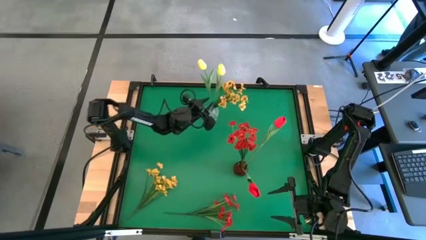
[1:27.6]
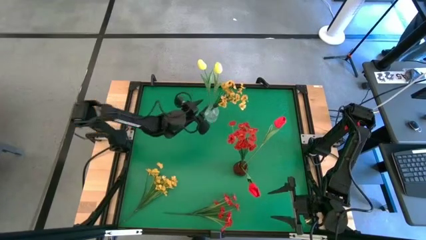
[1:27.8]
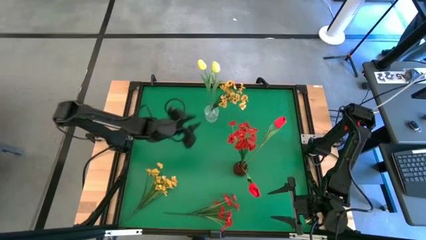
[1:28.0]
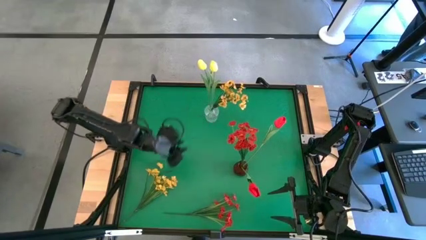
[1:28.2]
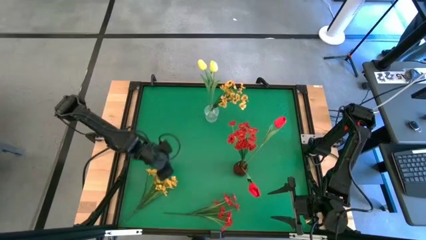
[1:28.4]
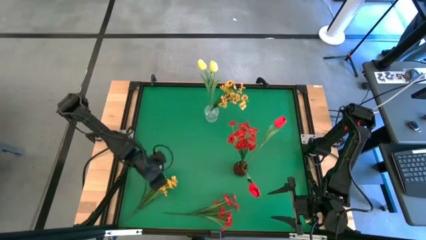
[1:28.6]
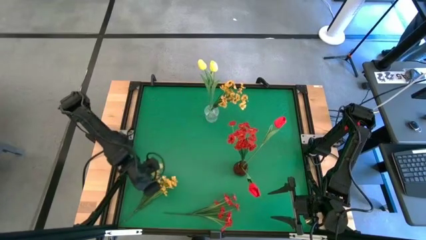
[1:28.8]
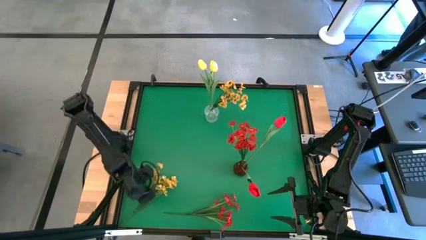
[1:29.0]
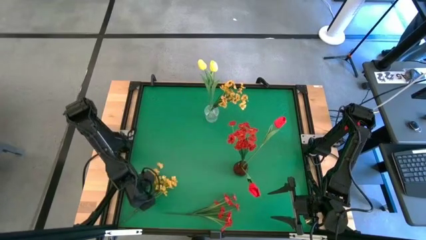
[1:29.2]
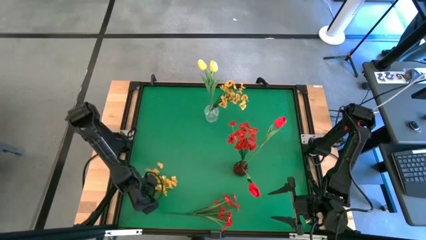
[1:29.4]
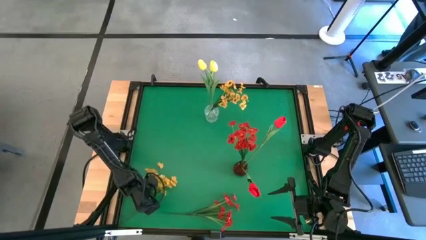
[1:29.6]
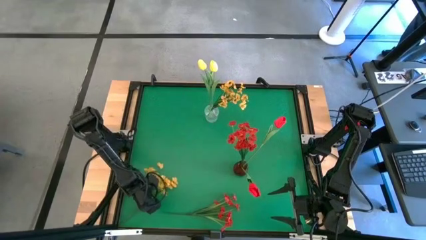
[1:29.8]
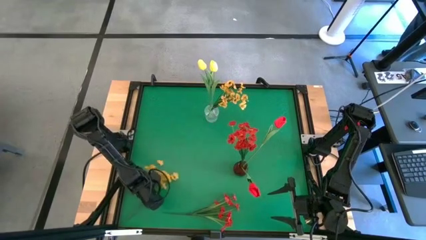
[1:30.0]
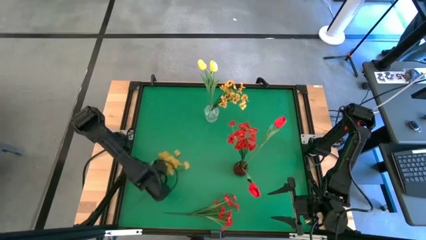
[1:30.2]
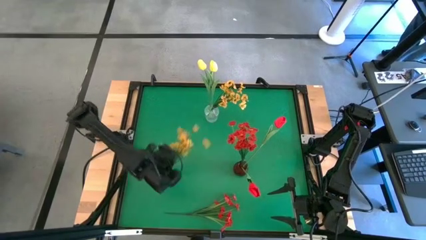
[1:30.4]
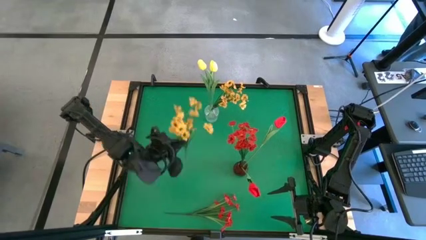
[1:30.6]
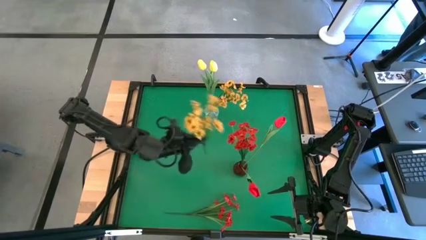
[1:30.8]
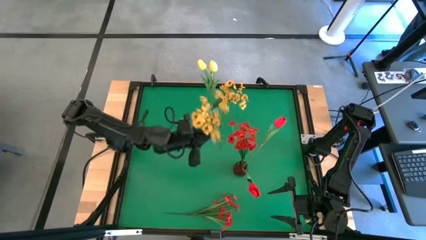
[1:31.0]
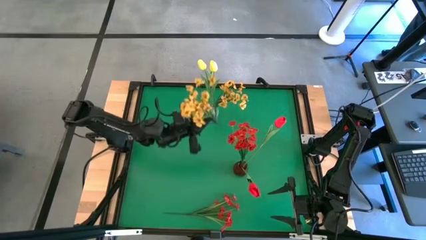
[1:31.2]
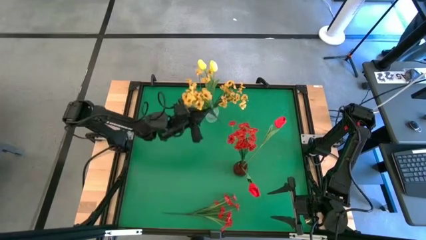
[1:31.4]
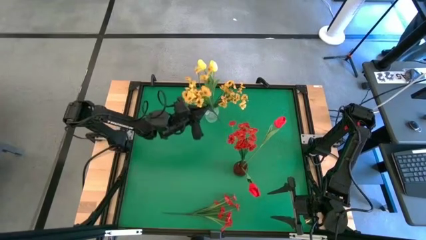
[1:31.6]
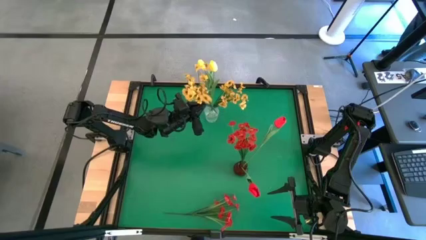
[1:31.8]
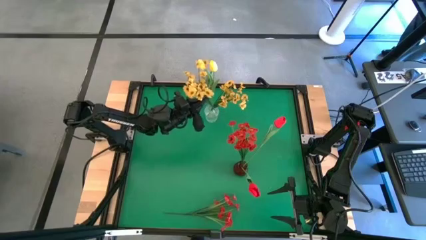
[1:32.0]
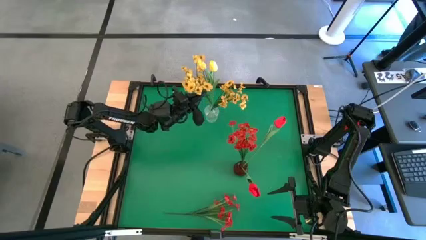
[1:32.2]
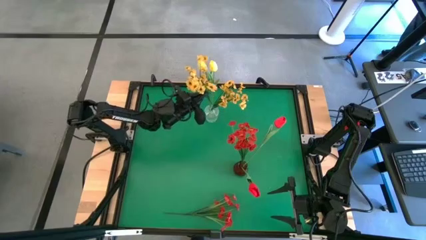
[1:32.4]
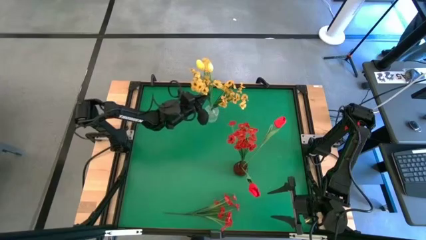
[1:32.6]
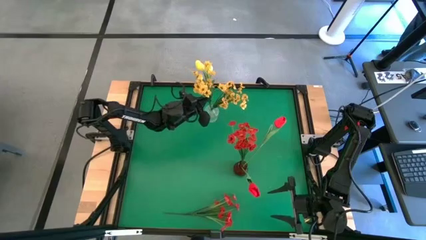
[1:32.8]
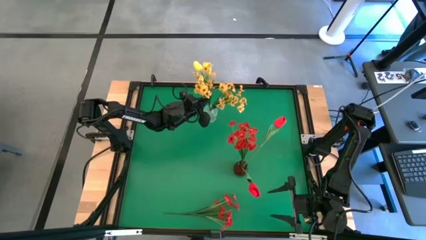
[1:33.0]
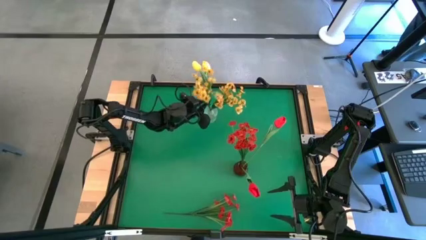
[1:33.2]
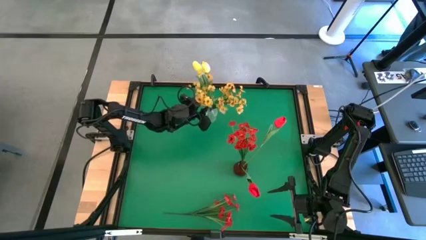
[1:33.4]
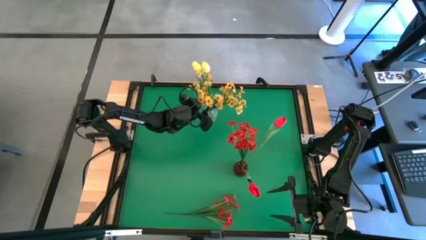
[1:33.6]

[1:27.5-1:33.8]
Task: Sort flowers into vase by color
Put the yellow flower into the transparent vase

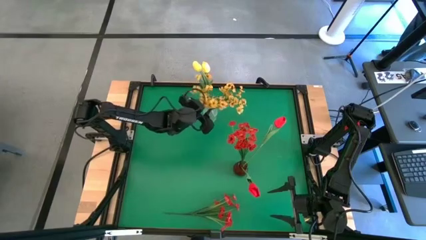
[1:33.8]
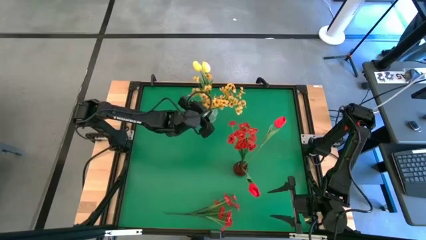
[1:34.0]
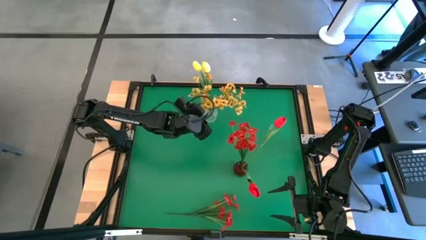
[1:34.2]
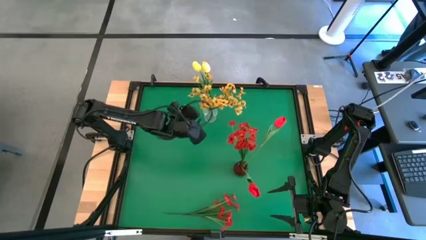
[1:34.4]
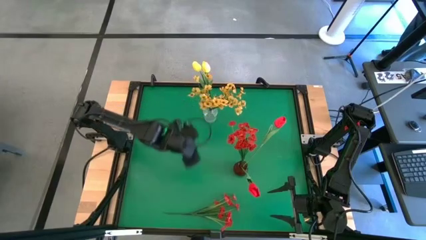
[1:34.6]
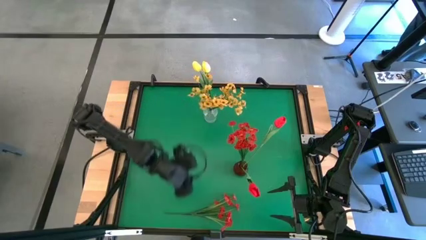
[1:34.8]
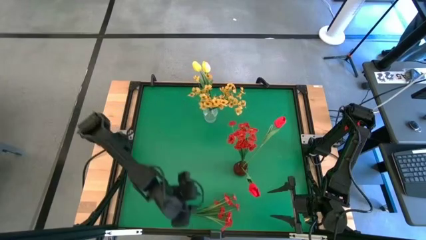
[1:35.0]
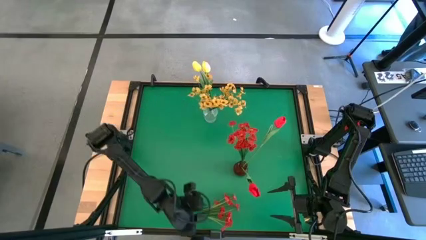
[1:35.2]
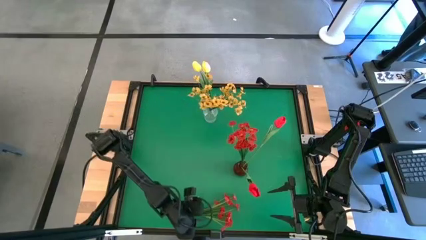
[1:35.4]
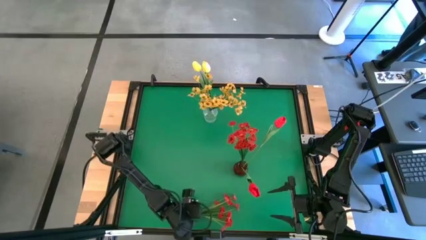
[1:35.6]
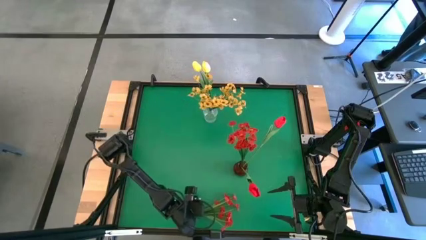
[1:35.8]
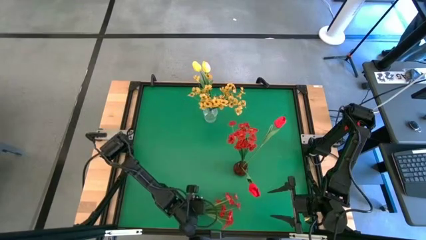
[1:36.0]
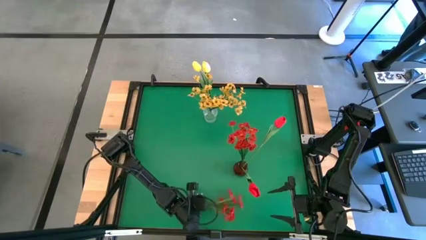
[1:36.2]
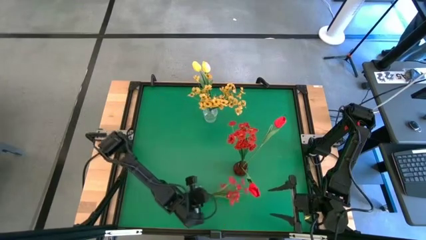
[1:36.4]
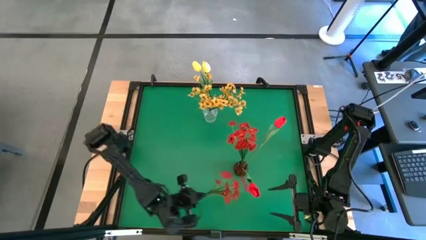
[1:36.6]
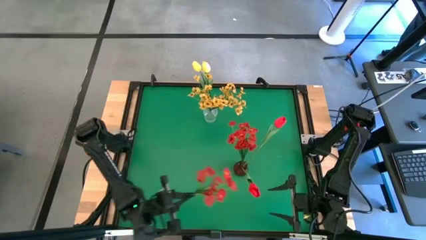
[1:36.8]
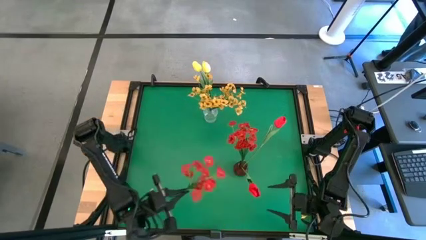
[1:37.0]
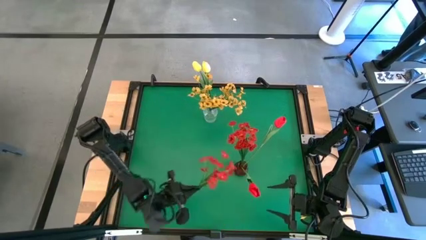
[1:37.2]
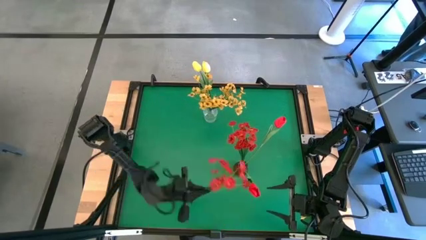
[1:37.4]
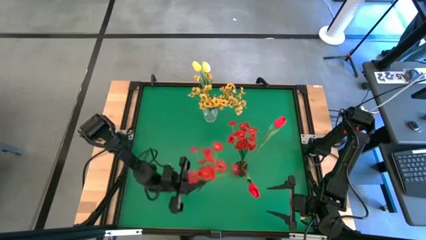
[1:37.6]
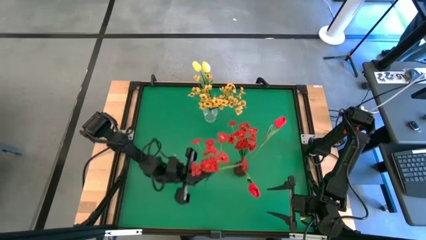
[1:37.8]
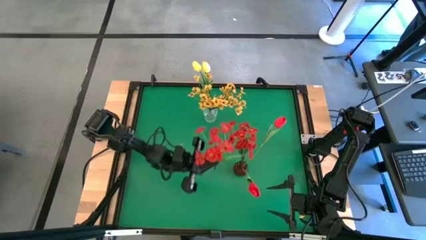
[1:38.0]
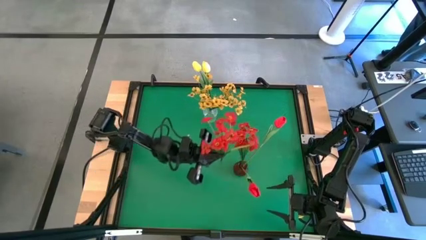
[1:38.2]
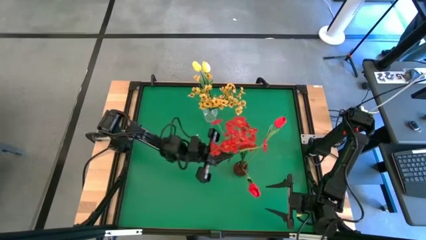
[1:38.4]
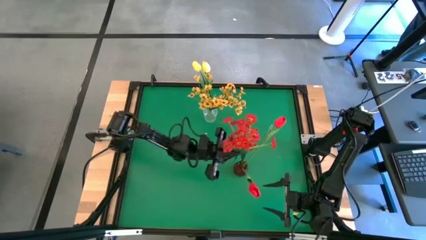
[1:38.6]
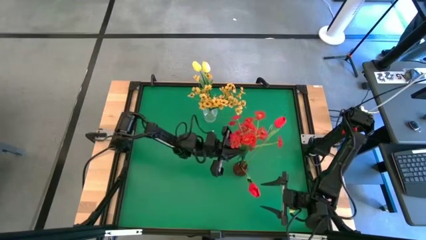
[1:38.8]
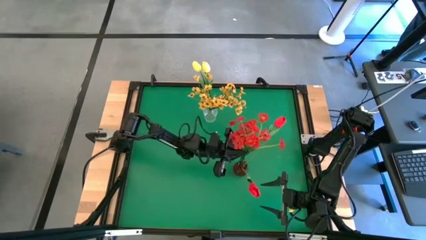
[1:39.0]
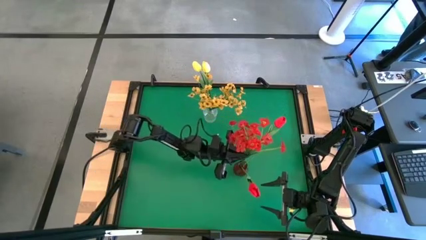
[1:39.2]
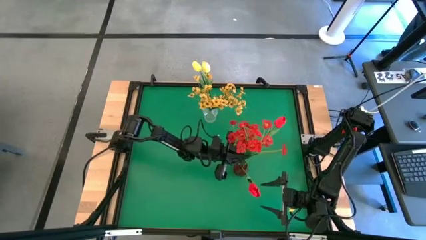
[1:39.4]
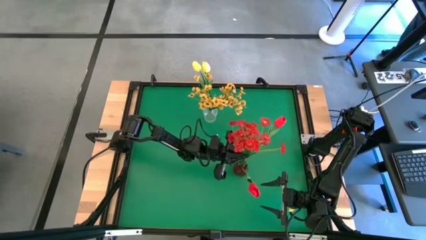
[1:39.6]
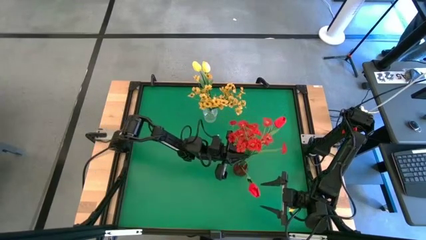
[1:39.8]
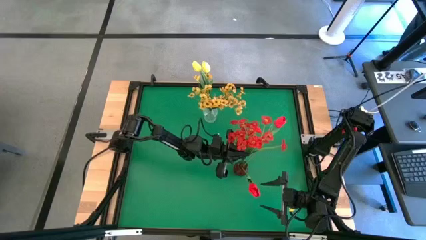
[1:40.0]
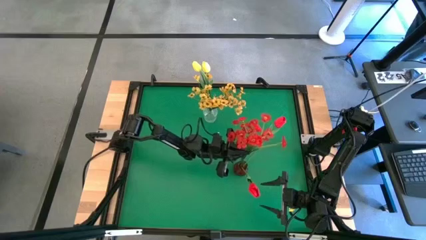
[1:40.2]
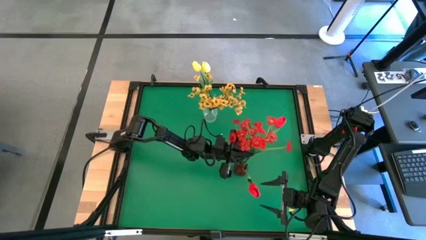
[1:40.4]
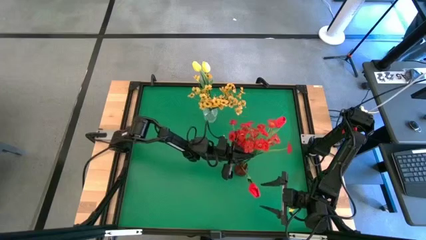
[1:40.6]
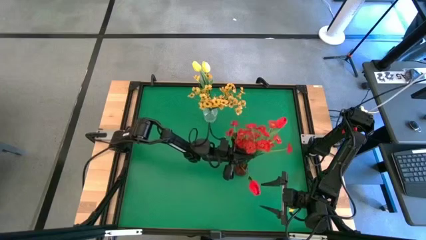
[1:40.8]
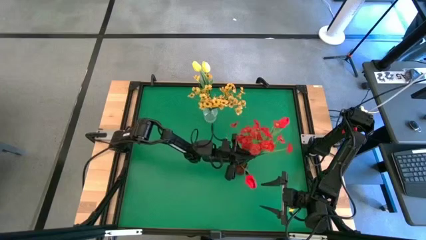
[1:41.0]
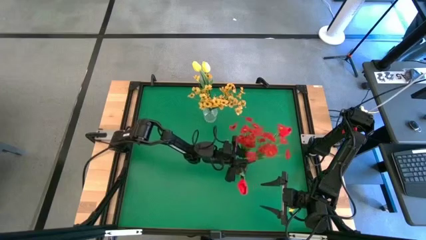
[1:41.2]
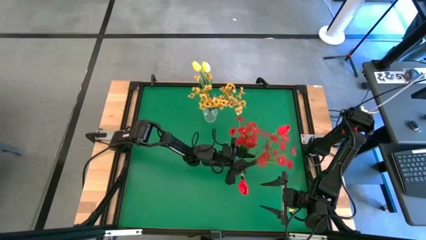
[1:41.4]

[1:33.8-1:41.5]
Put the red flower into the red vase
